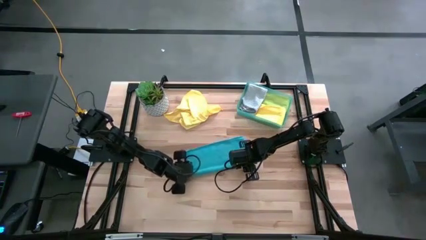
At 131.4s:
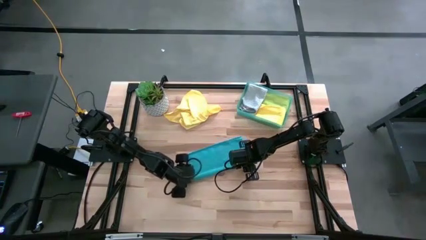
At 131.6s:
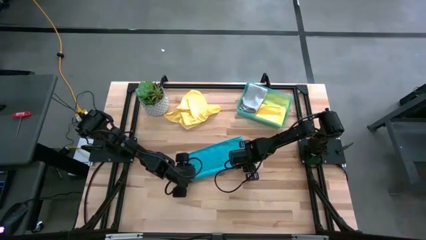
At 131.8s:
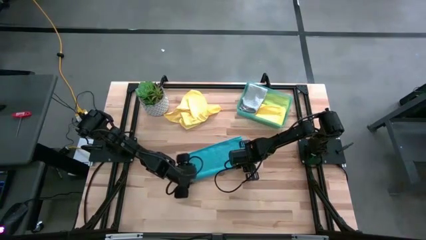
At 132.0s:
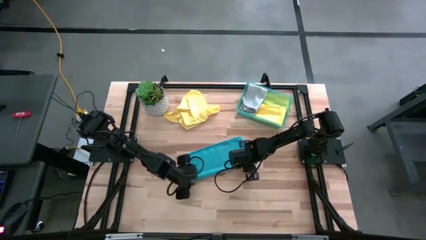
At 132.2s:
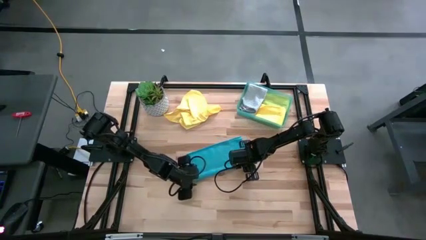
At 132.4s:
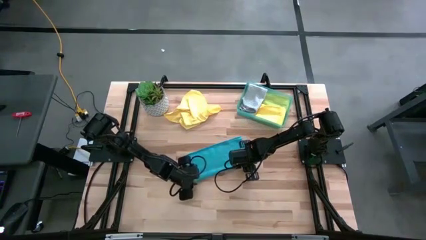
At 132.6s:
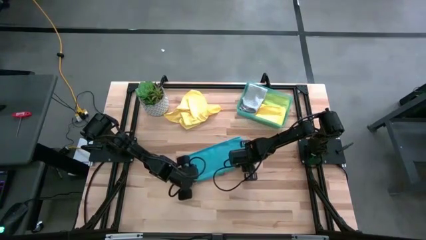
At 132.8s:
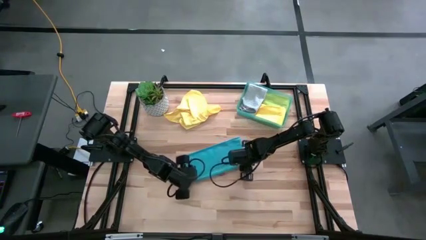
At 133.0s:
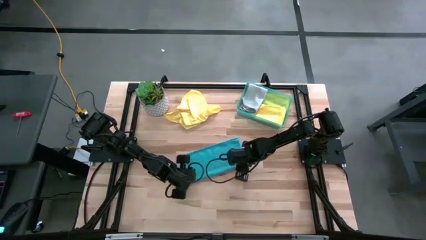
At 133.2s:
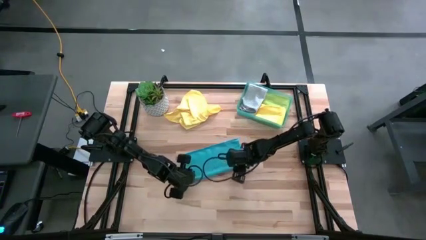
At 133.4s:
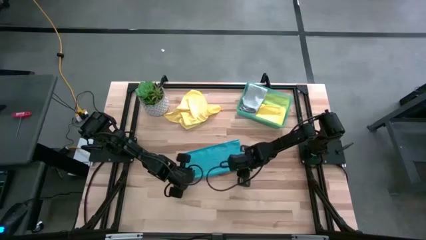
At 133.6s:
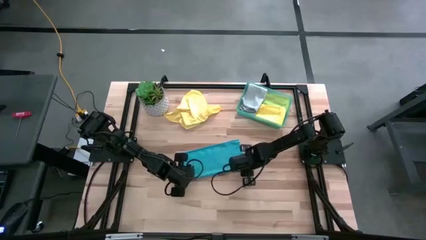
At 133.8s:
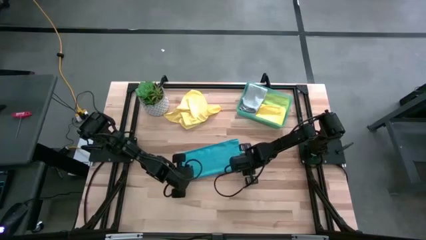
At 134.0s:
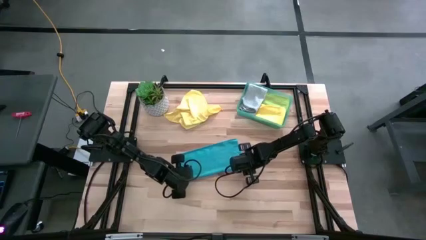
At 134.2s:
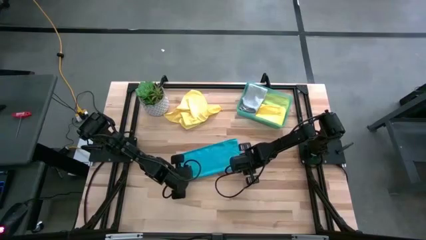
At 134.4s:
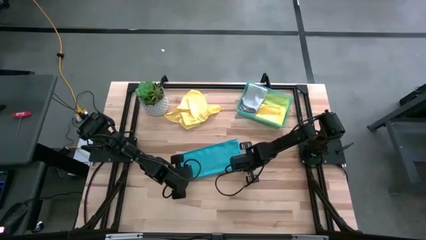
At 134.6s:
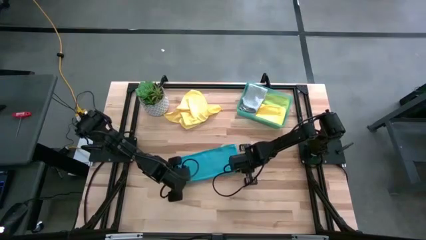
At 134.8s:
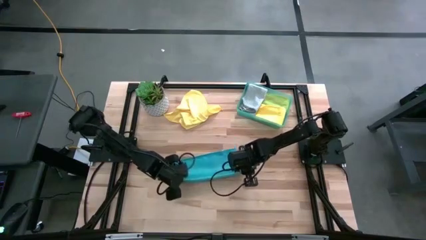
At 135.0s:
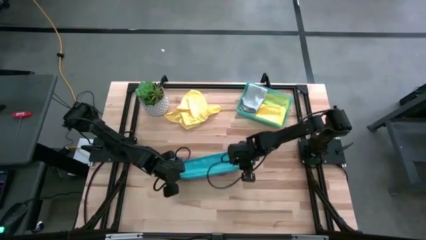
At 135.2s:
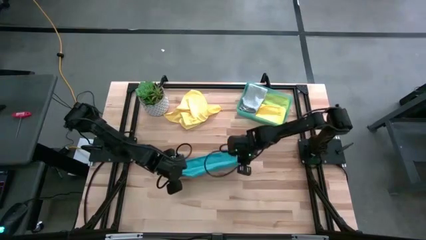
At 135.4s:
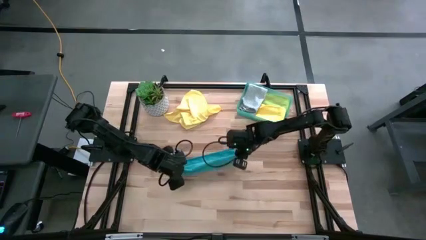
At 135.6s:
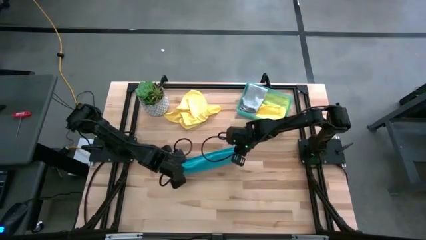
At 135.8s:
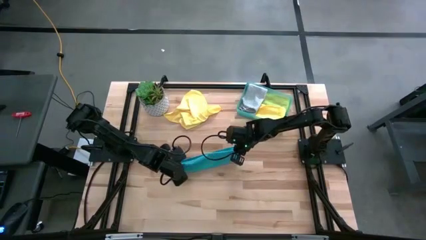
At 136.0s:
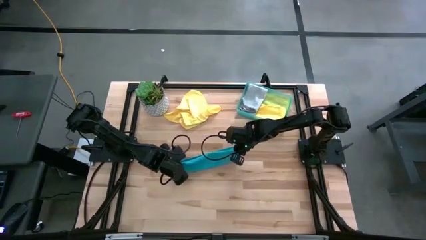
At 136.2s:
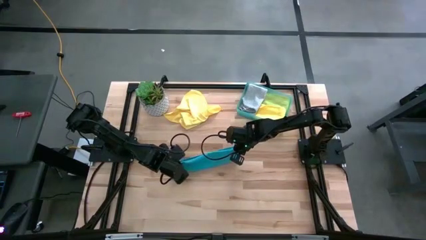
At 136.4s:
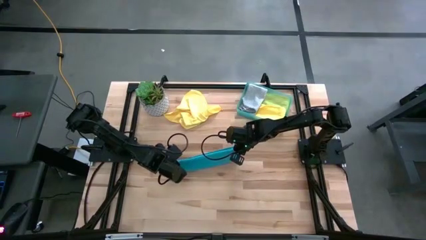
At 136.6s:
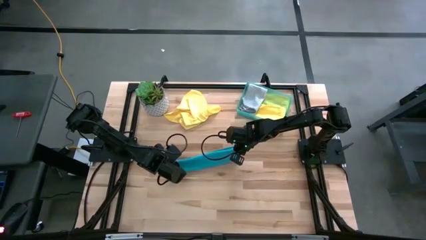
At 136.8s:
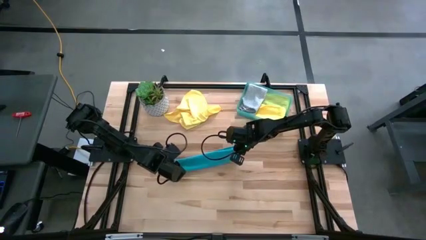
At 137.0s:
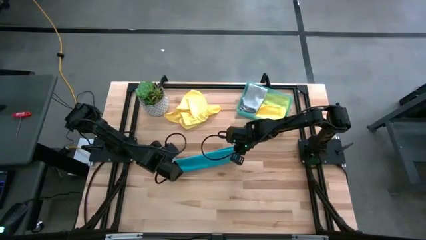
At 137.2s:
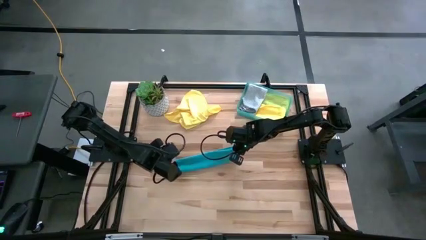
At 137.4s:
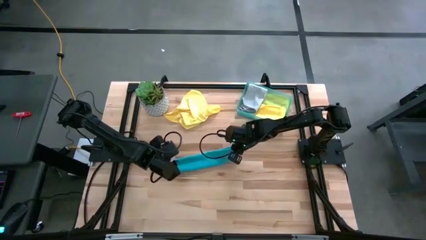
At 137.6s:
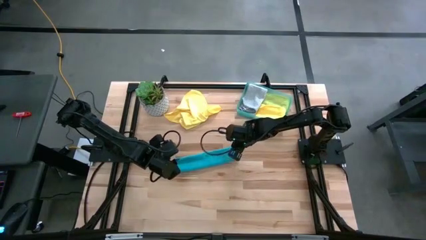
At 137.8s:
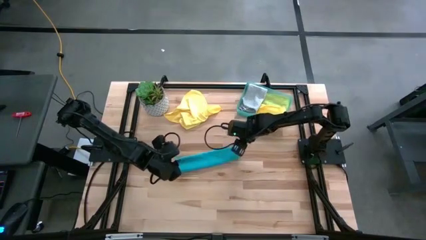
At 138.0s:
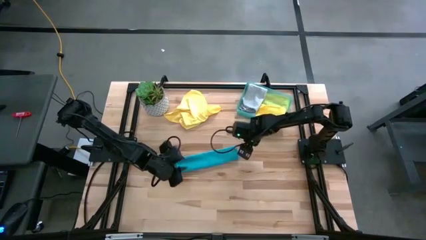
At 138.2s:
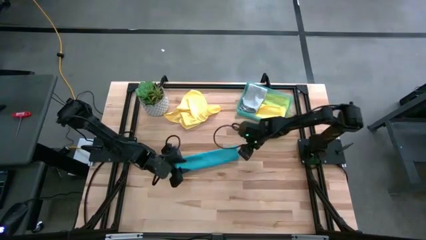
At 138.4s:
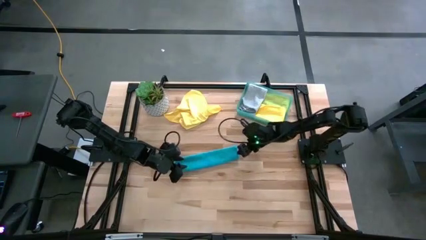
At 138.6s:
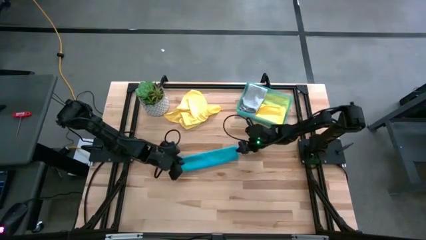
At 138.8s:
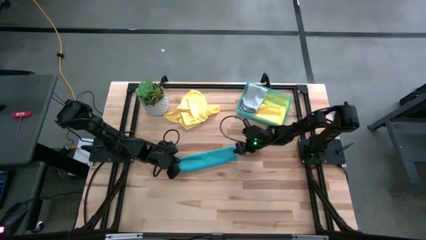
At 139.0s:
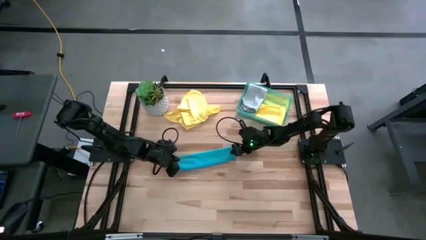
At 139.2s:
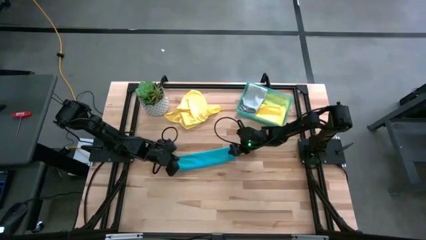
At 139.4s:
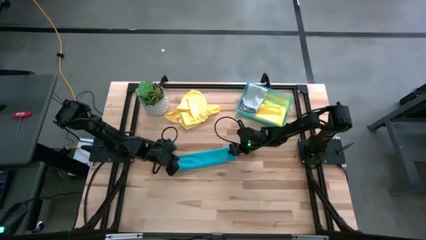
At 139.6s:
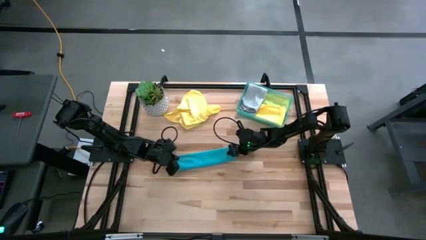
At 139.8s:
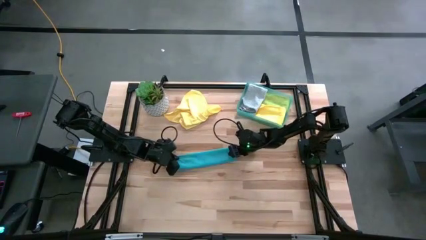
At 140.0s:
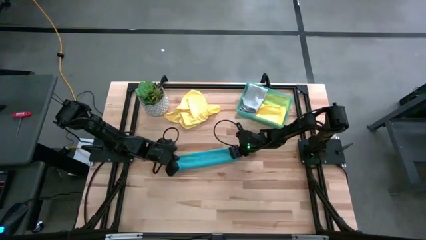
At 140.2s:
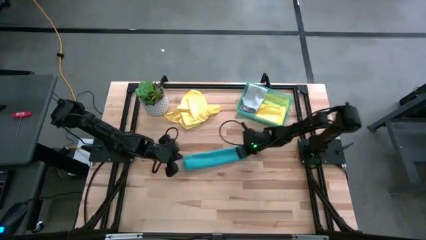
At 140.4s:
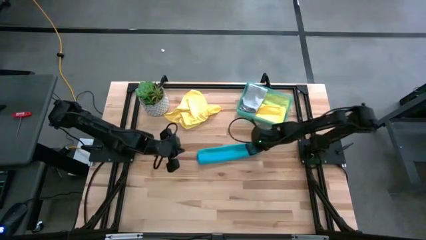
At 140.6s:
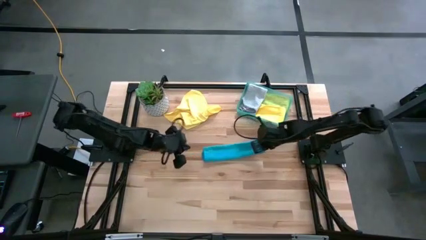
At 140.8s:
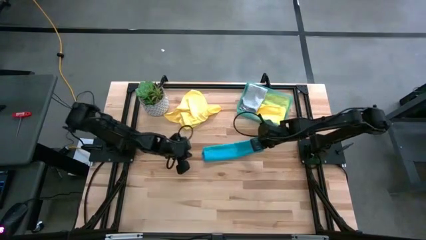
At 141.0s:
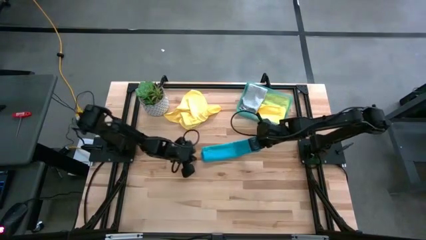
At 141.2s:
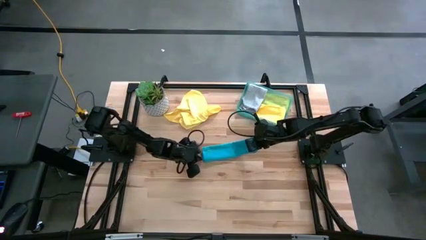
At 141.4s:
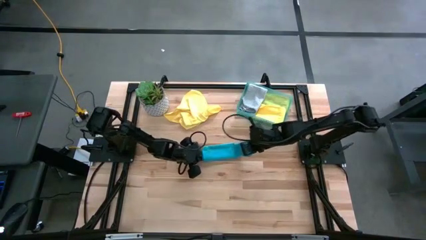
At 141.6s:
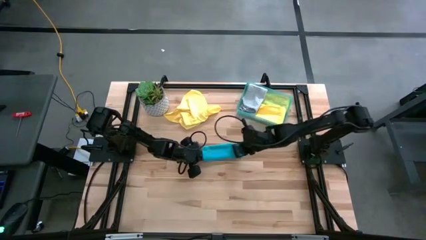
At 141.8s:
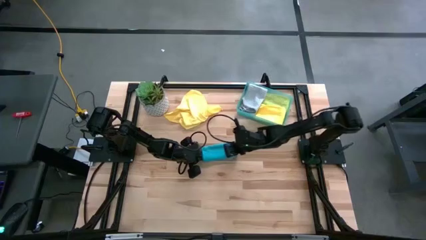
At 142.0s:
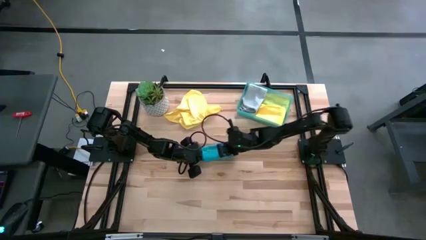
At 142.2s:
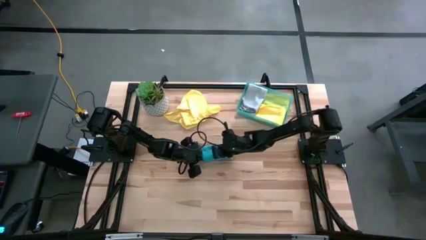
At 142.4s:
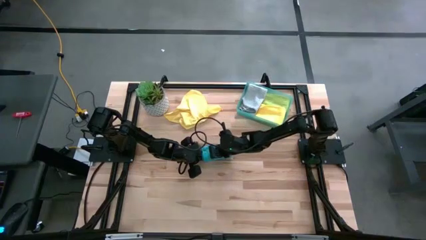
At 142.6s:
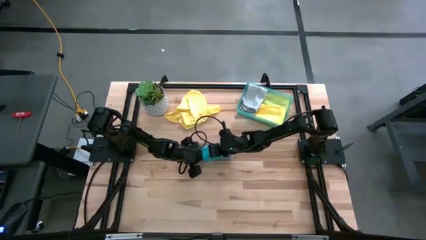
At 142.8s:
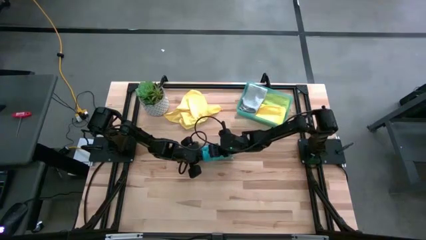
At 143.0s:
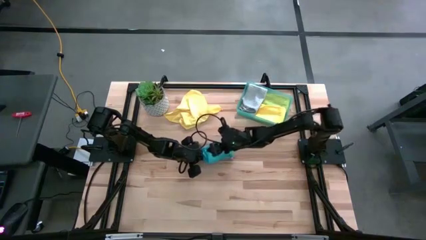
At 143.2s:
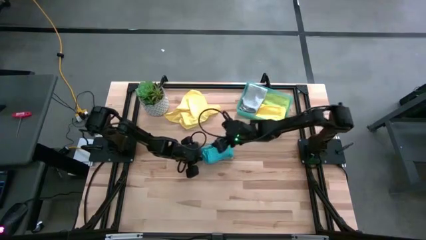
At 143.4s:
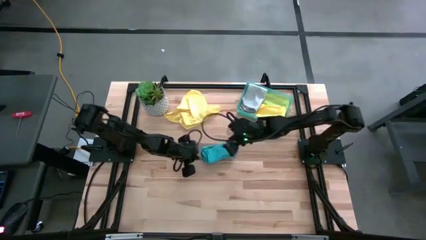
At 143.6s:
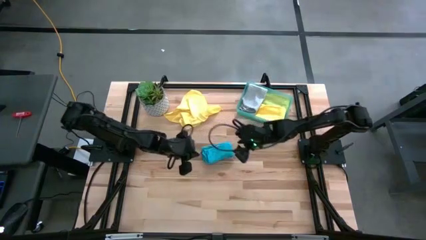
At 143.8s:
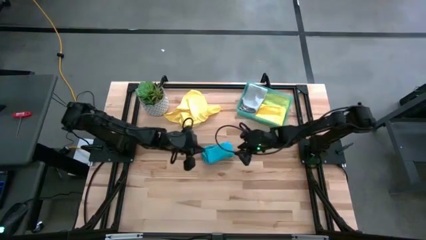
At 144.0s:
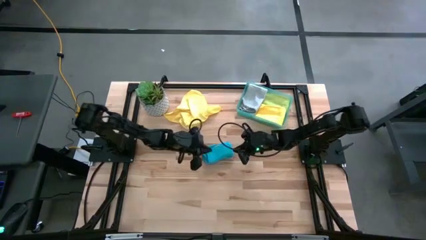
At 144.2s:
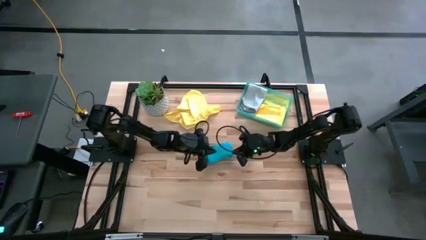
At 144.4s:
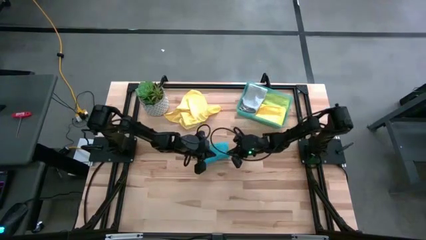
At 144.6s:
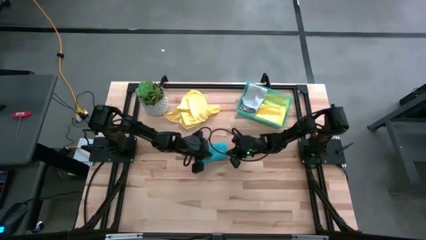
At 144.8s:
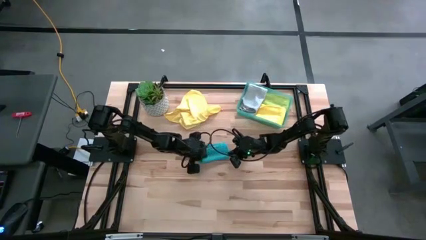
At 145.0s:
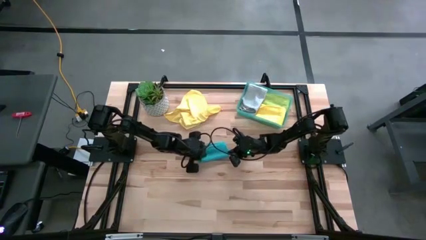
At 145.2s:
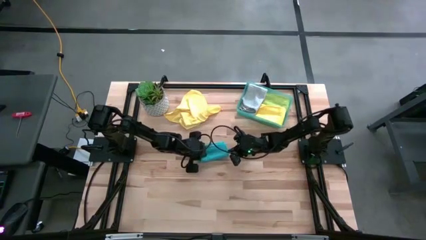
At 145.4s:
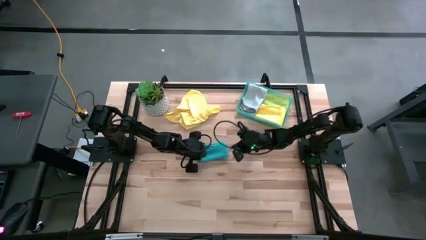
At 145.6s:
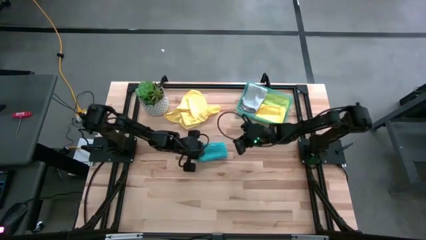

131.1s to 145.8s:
Task: Fold microfiber towels
Fold the blue towel

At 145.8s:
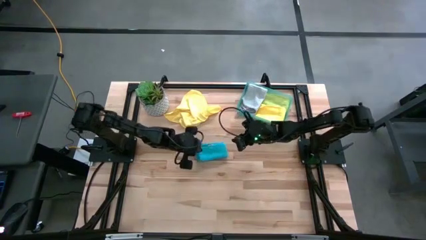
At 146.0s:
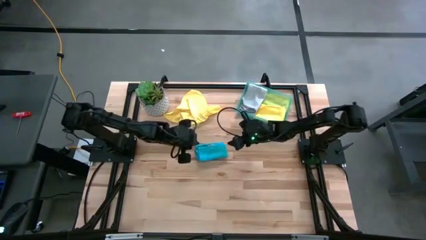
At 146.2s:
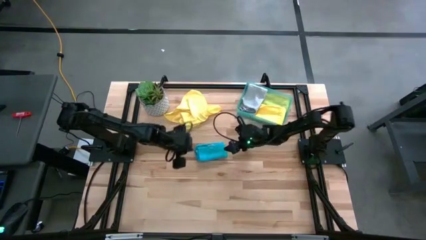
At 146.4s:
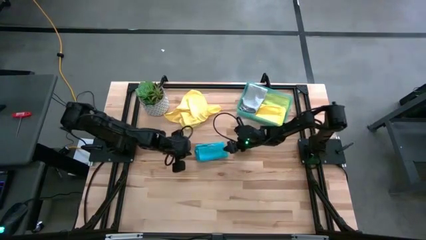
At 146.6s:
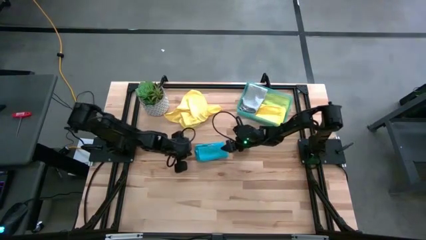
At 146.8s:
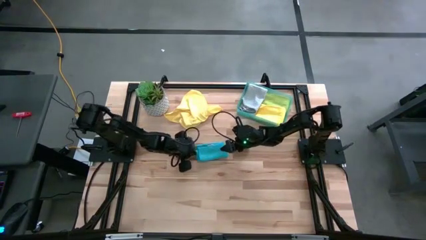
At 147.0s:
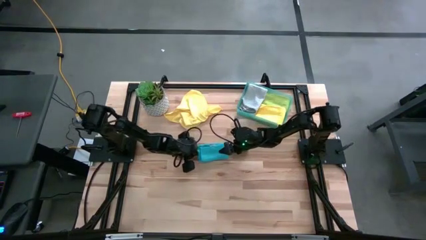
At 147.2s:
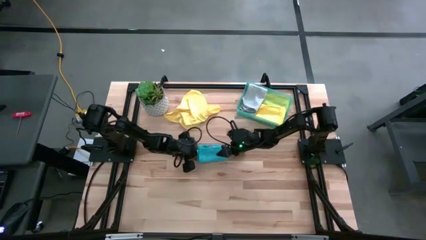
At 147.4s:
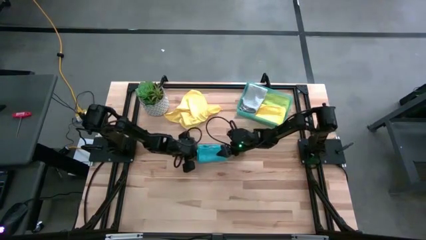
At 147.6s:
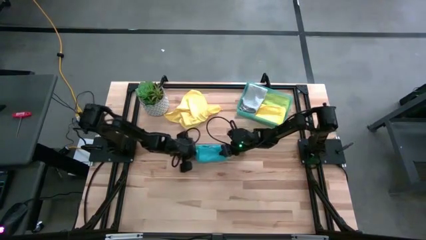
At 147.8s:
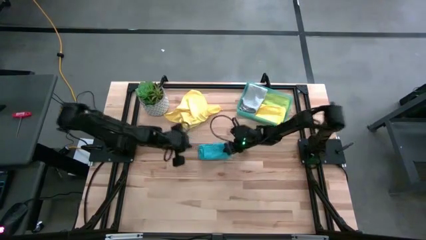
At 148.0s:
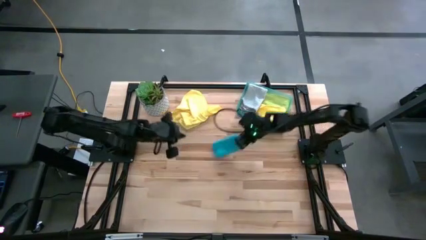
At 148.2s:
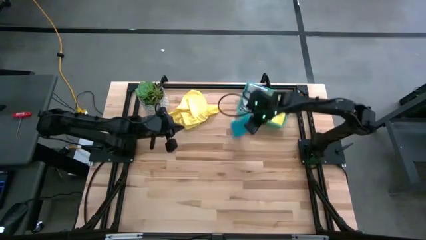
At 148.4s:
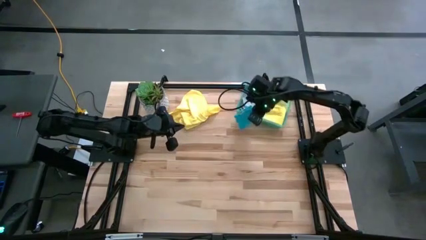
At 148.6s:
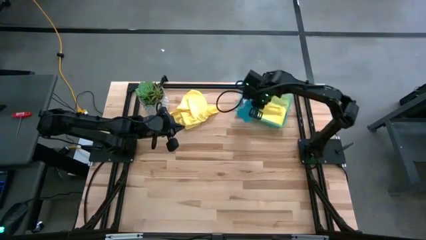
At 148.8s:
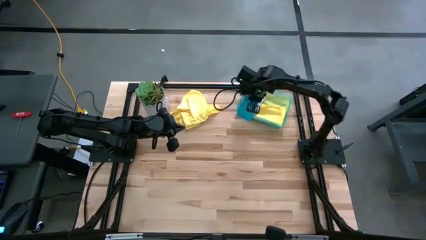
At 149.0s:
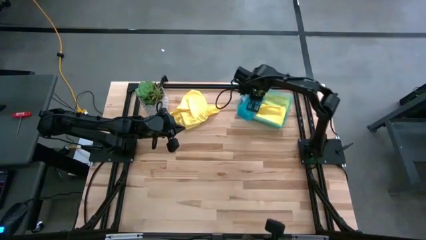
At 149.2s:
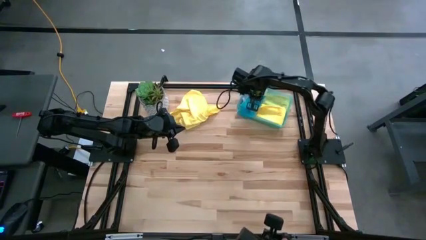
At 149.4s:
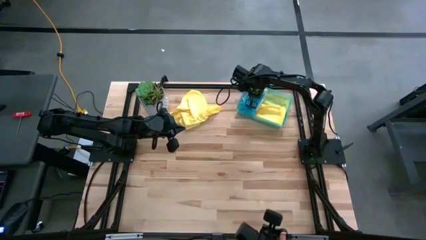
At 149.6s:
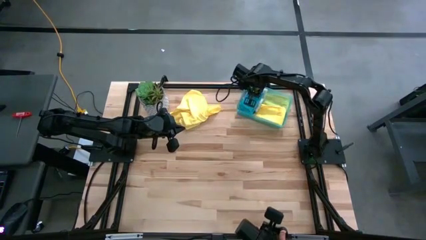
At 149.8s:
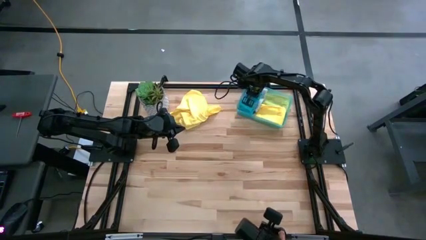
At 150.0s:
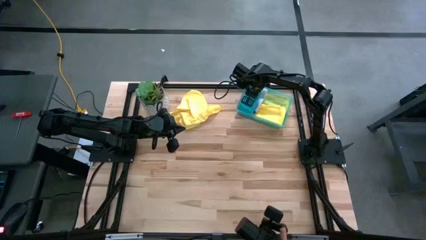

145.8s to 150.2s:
Put the blue towel into the bin
